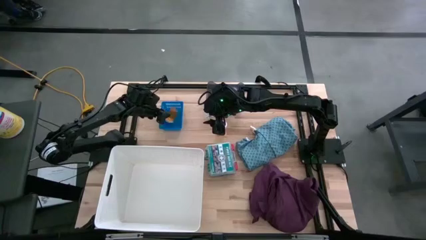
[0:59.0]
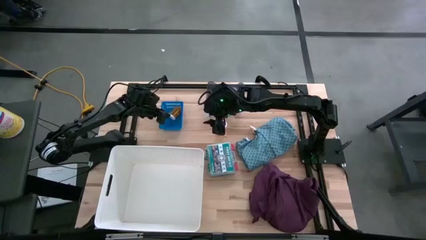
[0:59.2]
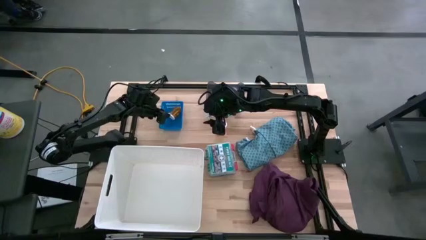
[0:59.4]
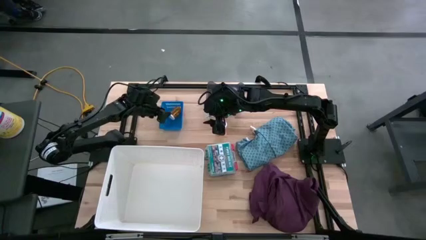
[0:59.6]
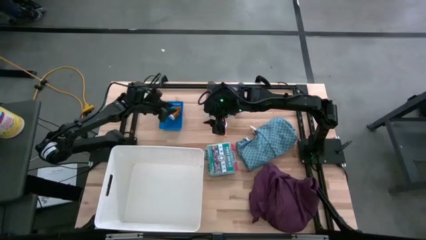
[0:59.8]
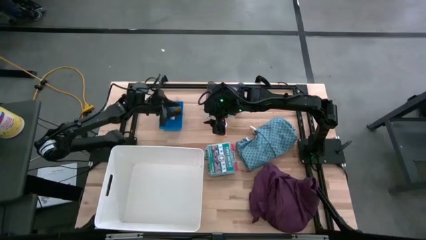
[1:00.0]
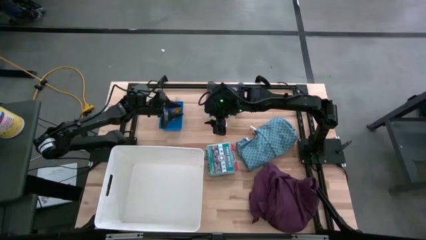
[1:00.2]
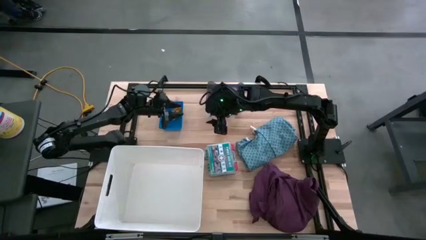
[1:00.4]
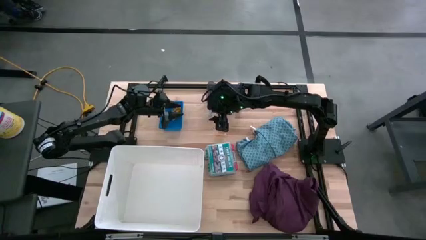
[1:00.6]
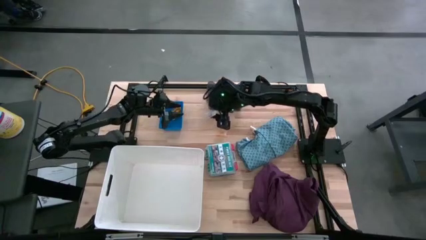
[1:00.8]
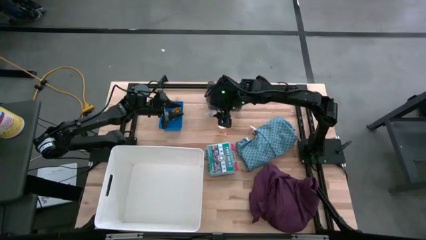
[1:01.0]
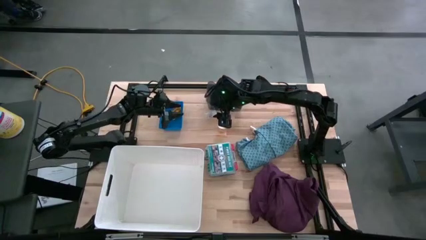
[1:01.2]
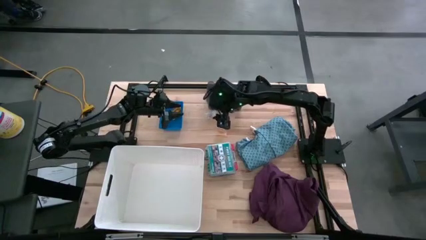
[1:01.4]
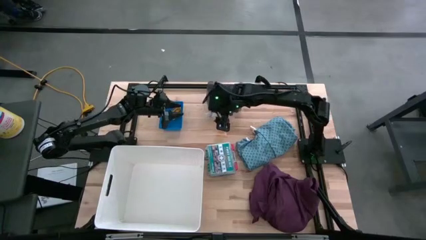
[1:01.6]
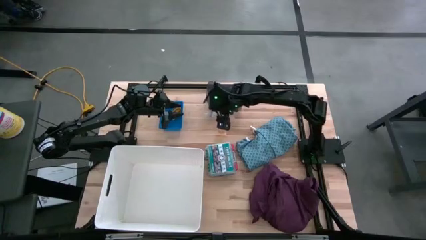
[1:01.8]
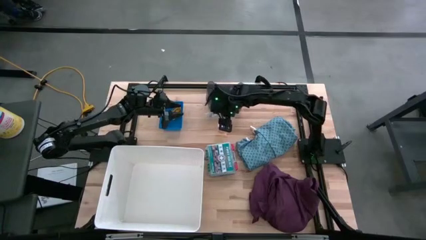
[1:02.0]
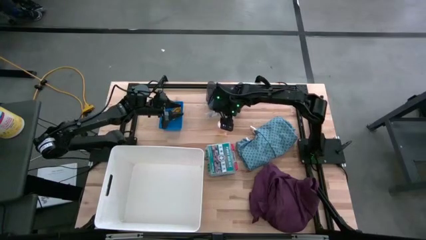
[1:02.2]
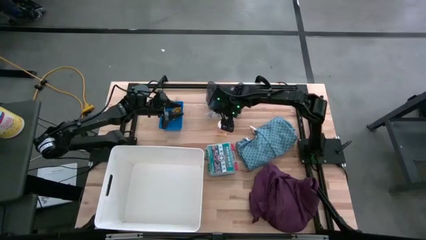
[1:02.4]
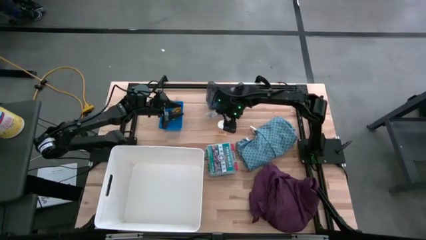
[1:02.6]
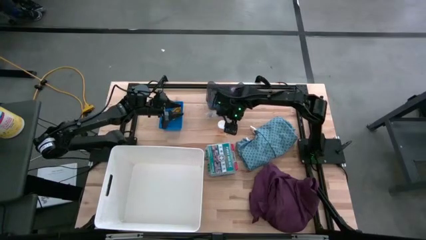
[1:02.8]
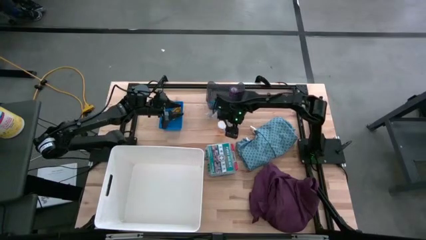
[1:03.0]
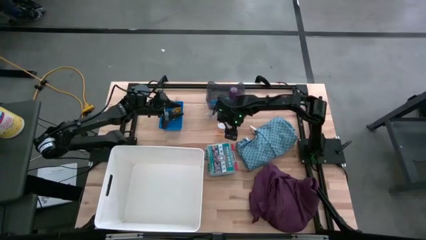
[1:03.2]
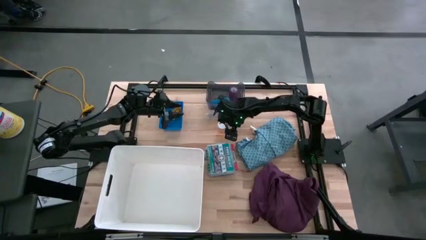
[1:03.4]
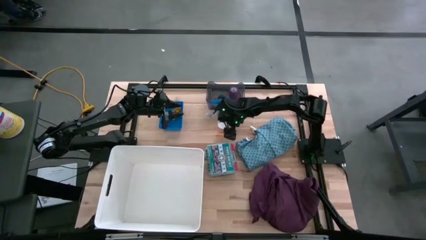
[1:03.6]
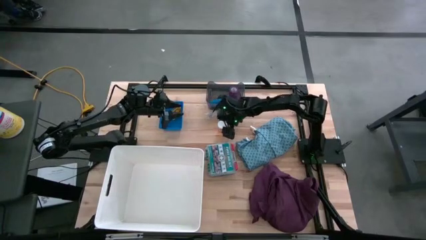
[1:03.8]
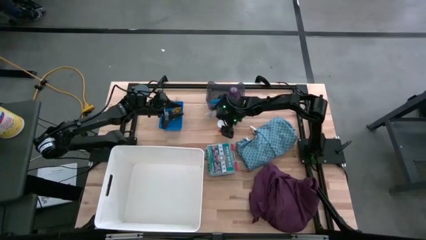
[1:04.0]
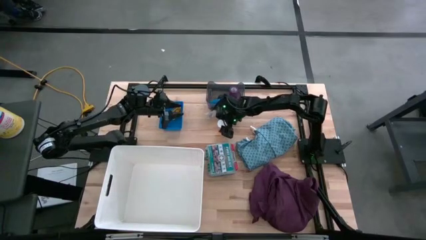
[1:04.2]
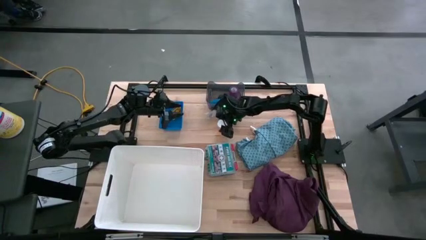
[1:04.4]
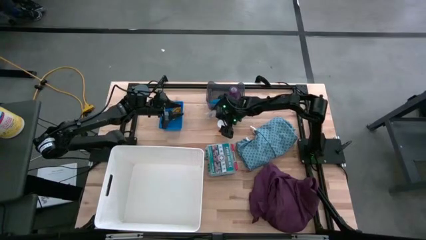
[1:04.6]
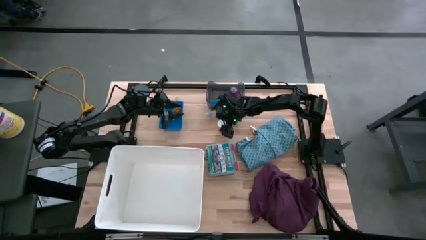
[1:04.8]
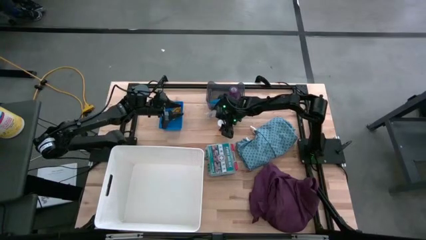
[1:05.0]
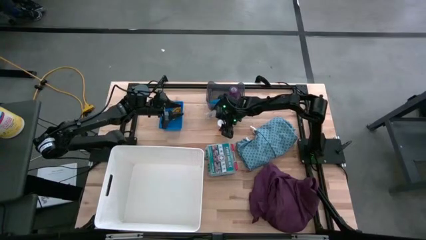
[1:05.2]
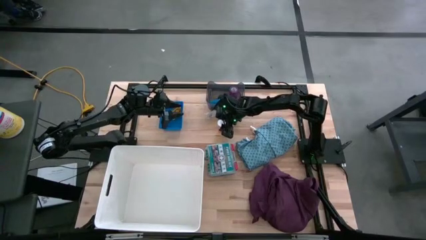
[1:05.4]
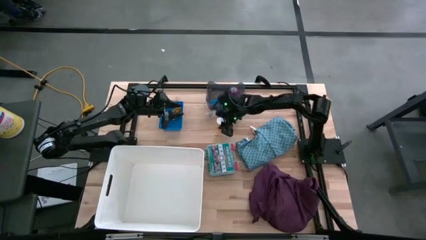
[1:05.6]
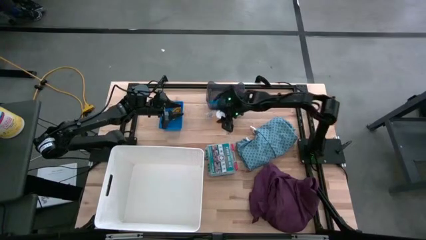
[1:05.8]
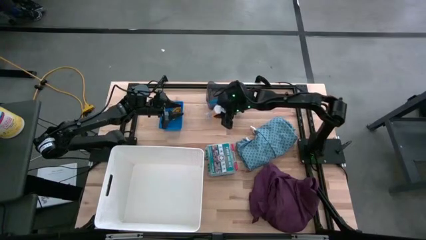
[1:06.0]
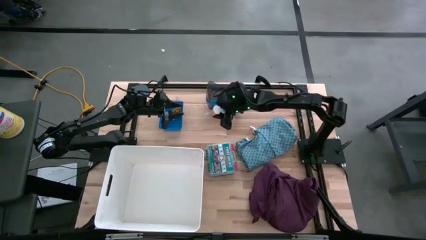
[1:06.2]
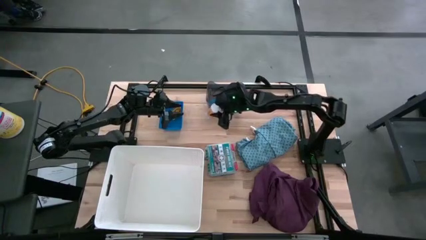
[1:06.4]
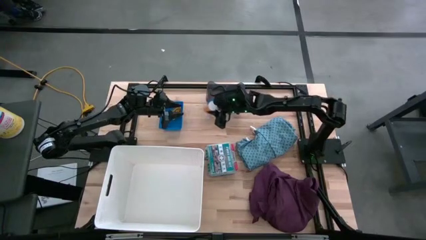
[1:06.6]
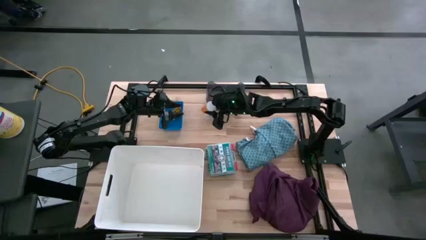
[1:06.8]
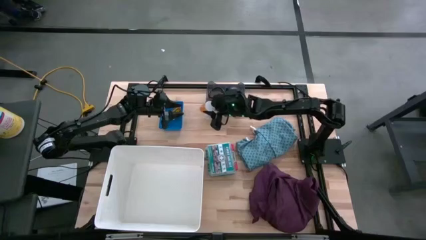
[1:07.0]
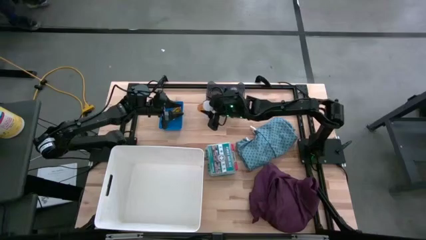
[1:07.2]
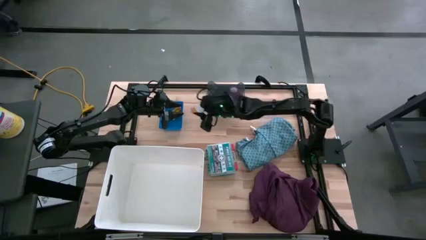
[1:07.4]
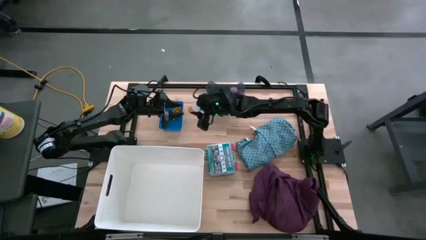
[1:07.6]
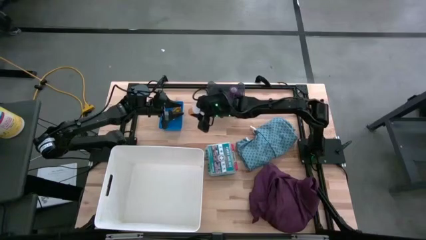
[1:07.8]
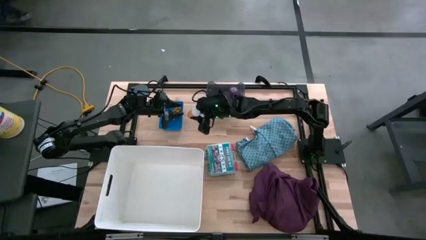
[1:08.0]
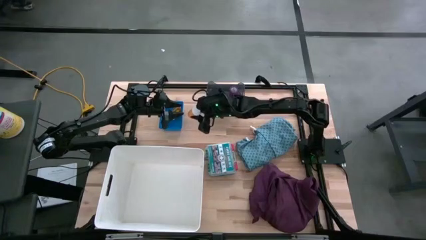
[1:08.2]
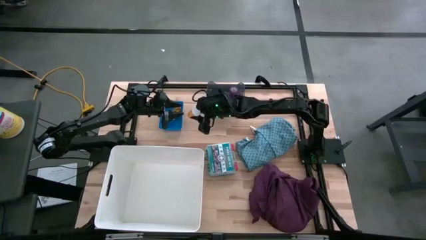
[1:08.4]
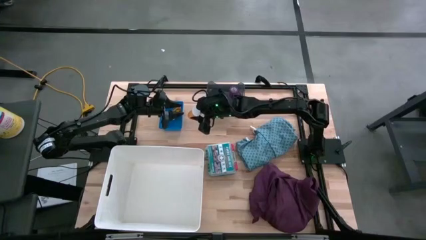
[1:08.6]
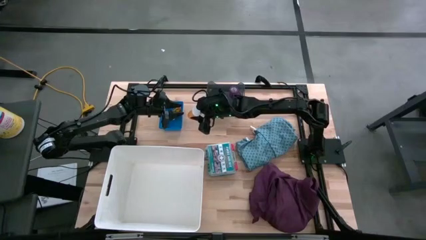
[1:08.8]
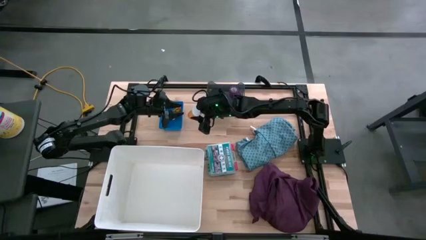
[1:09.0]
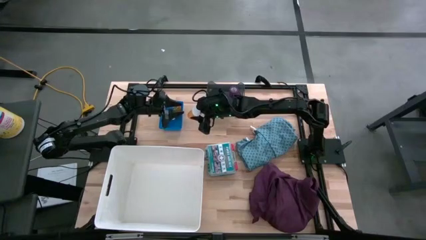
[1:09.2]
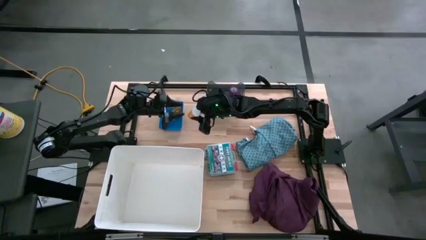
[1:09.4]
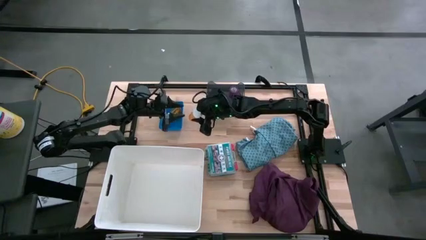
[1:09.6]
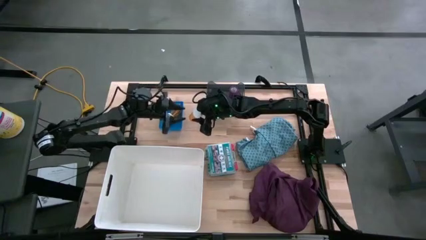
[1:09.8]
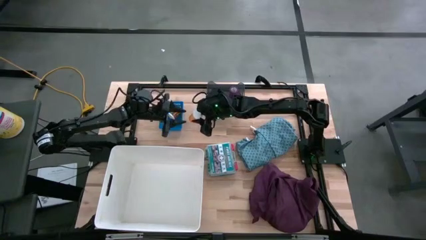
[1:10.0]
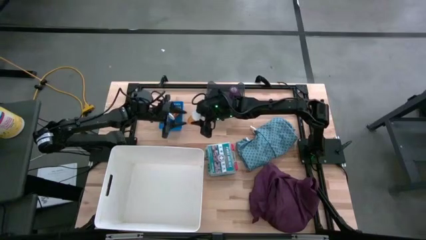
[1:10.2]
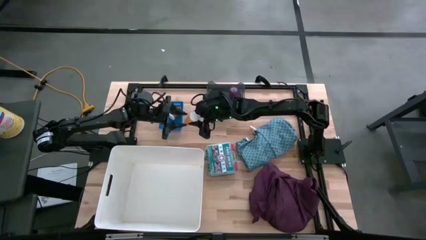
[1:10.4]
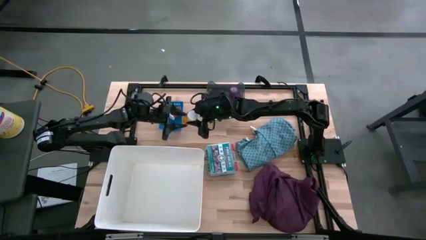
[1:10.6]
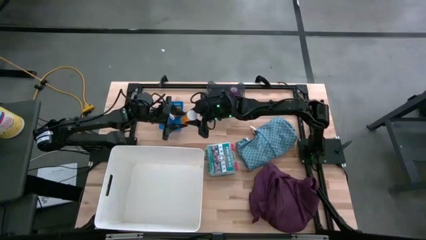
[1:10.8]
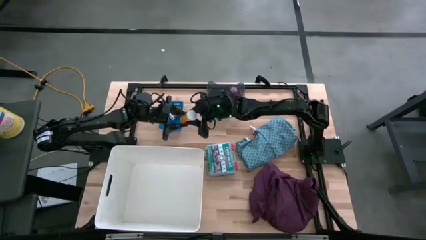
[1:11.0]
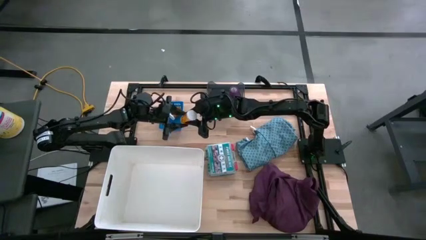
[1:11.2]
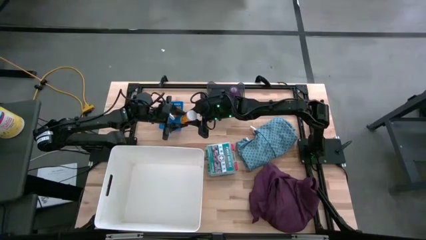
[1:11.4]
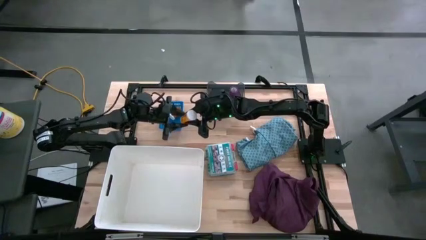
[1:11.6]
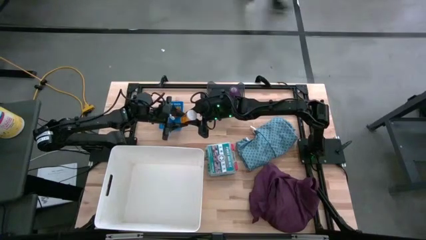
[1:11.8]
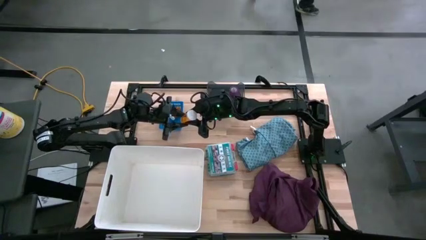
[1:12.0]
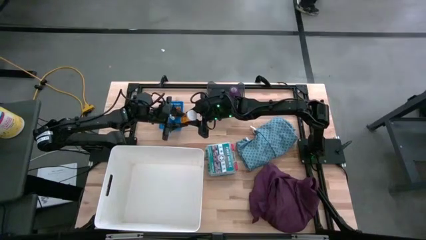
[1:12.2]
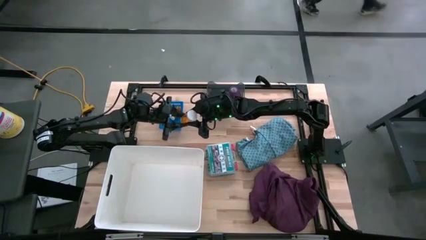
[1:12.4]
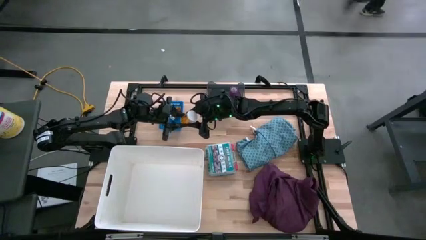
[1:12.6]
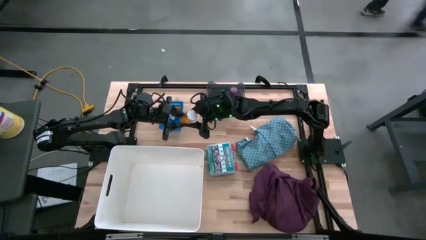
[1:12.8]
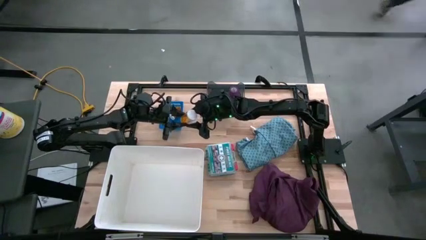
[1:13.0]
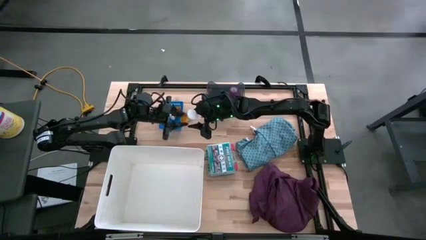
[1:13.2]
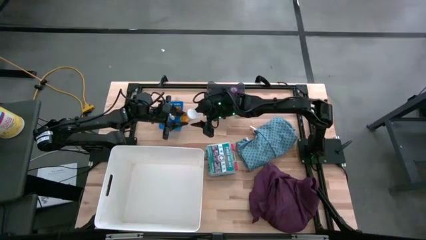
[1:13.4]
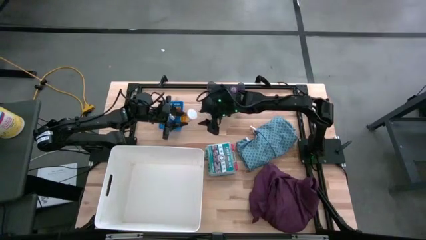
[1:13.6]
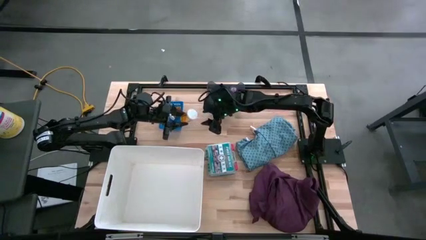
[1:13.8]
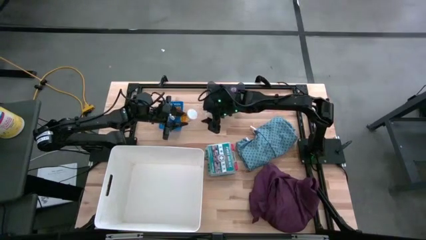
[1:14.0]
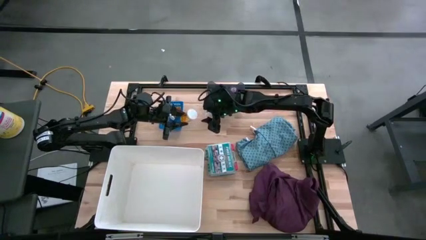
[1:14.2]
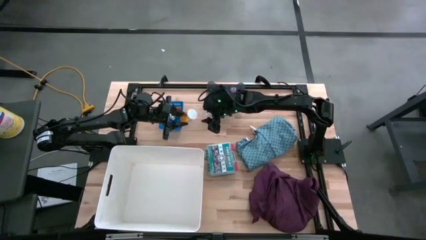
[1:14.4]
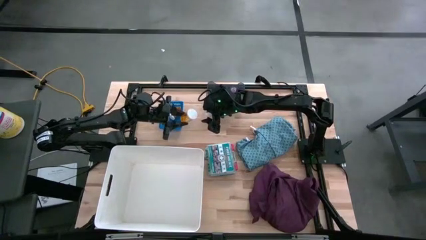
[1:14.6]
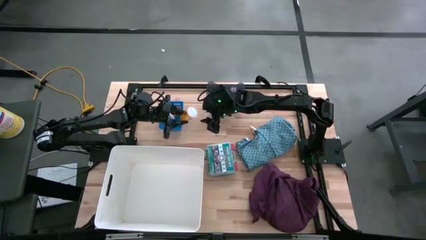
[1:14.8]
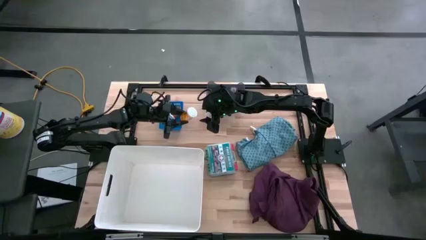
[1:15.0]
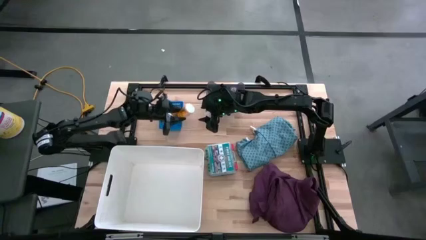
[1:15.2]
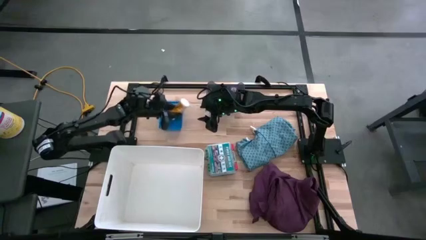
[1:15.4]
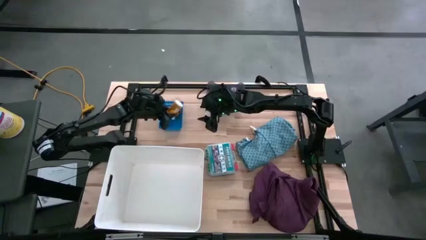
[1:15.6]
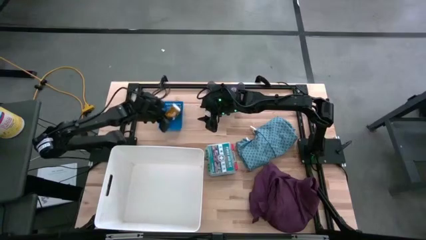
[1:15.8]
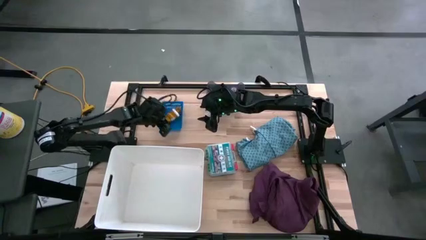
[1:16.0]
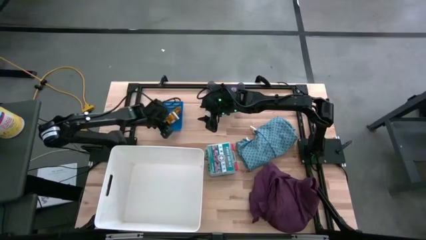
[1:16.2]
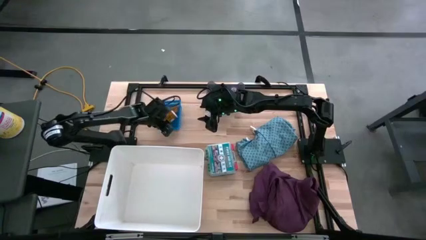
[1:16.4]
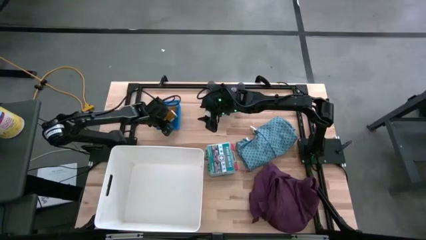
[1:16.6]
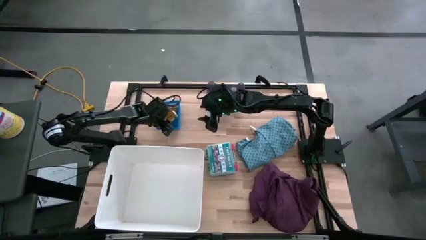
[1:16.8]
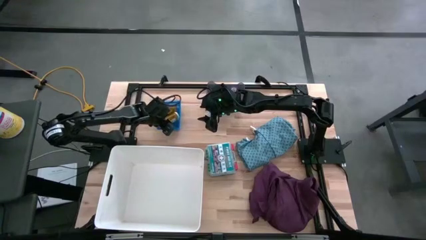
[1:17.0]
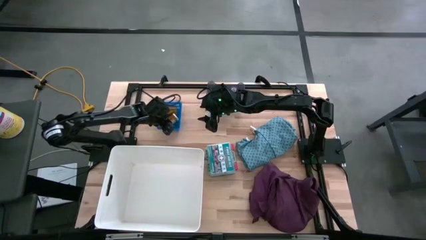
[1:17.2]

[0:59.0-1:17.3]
Task: Pick & place medical supplies in basket/bin
Put the orange pill bottle into the blue bin
